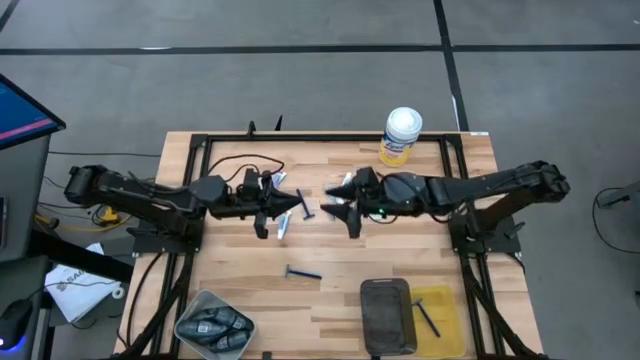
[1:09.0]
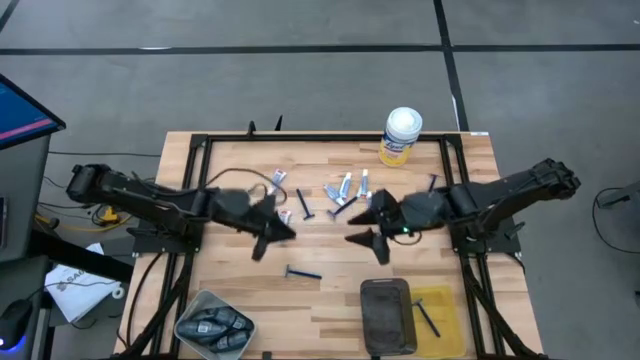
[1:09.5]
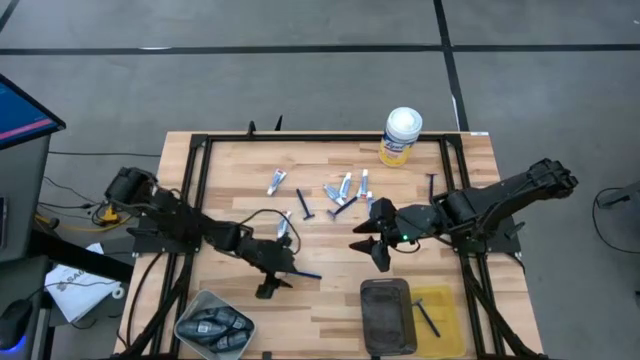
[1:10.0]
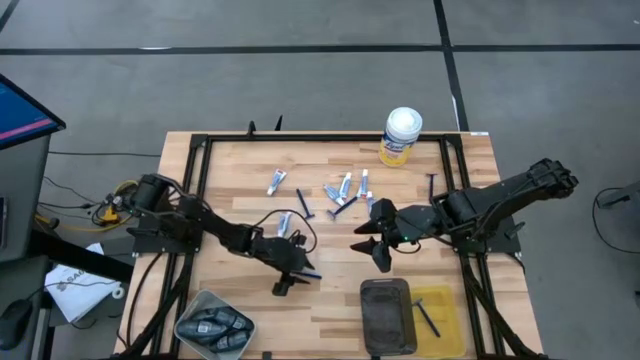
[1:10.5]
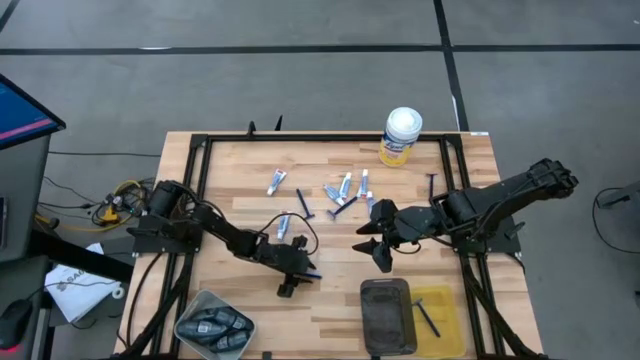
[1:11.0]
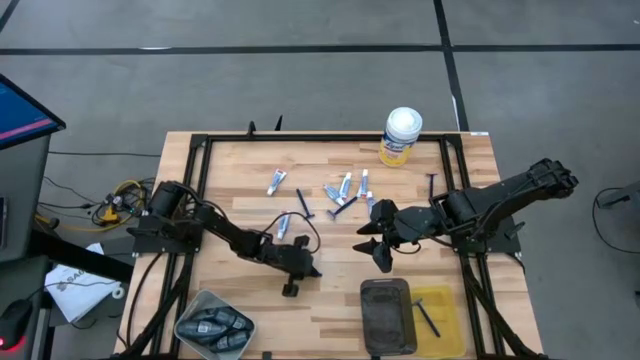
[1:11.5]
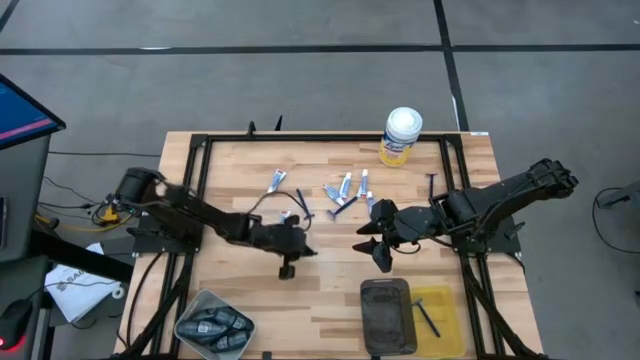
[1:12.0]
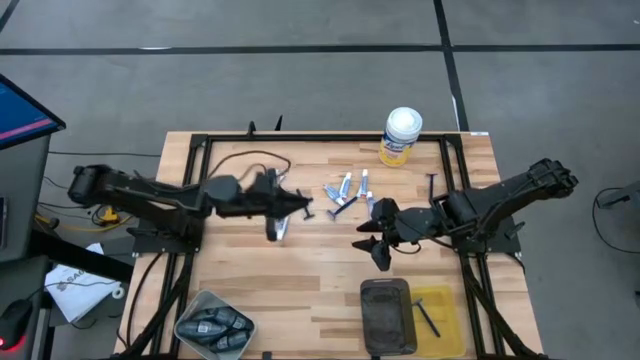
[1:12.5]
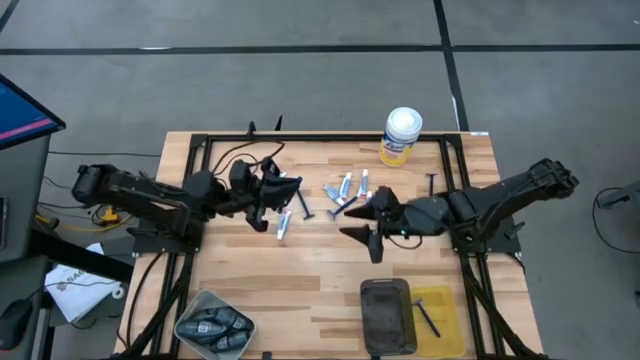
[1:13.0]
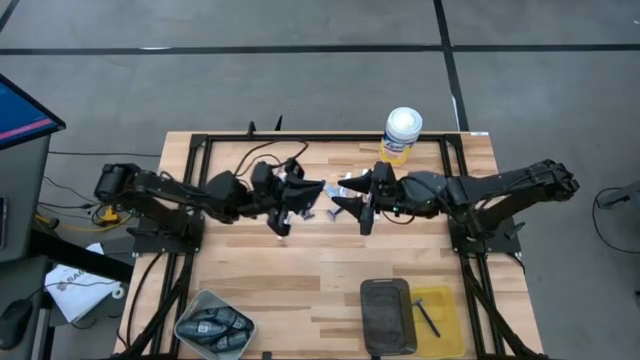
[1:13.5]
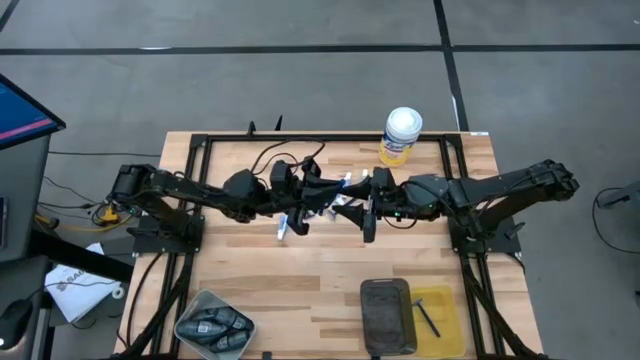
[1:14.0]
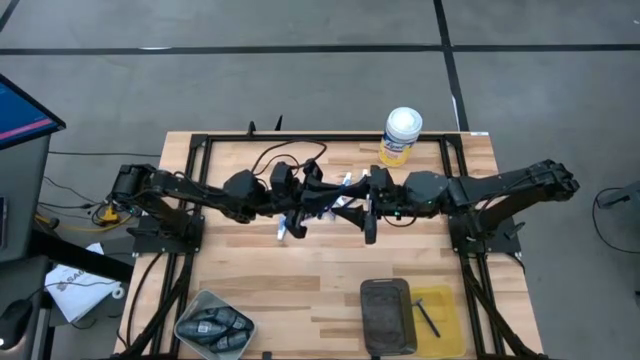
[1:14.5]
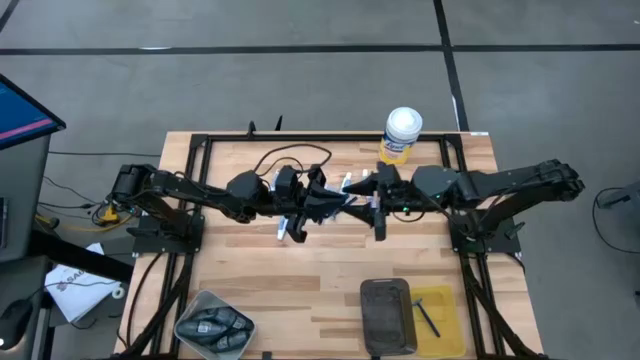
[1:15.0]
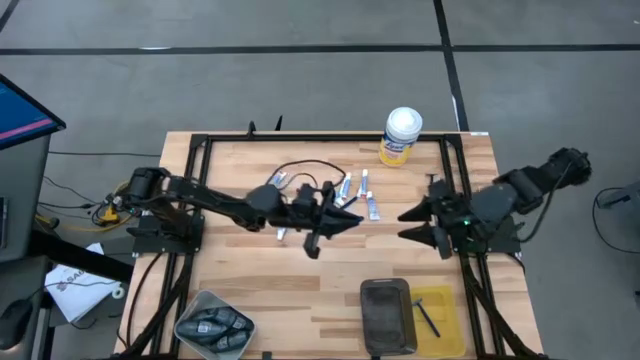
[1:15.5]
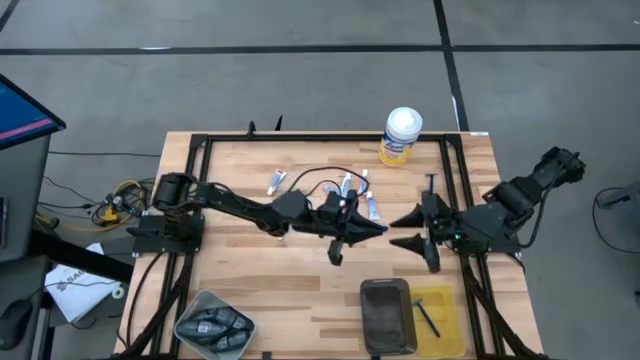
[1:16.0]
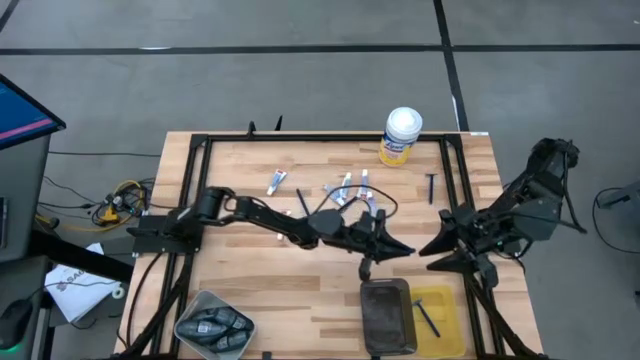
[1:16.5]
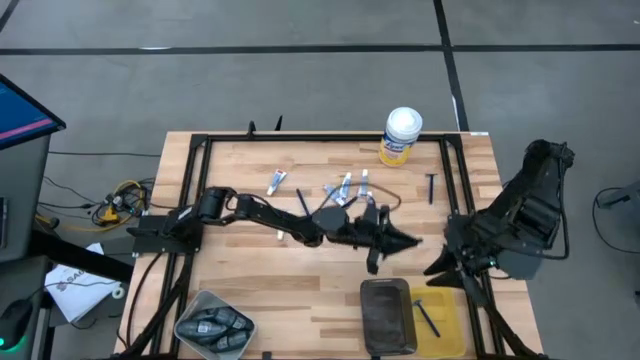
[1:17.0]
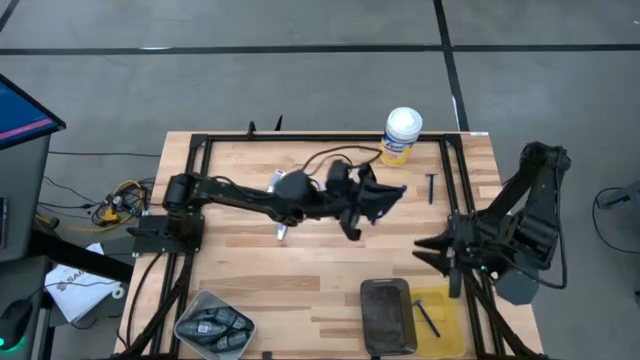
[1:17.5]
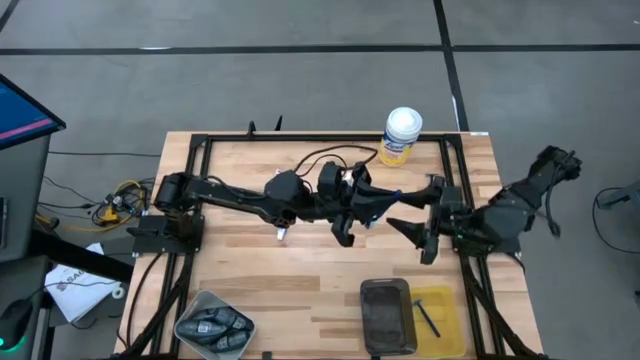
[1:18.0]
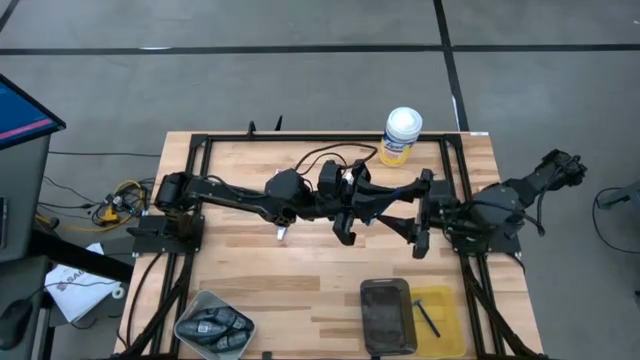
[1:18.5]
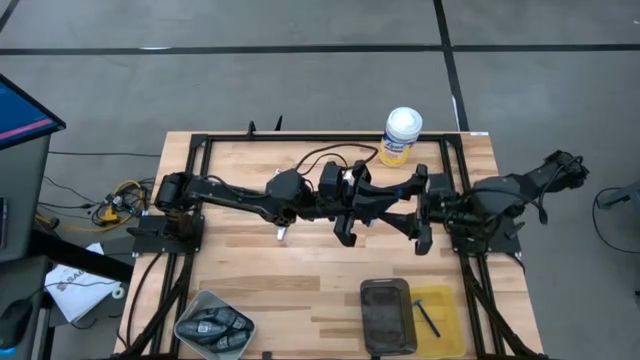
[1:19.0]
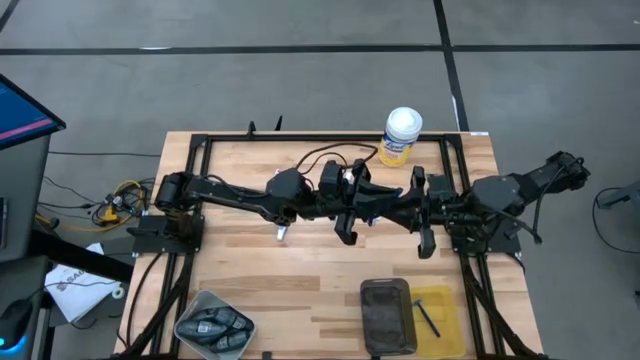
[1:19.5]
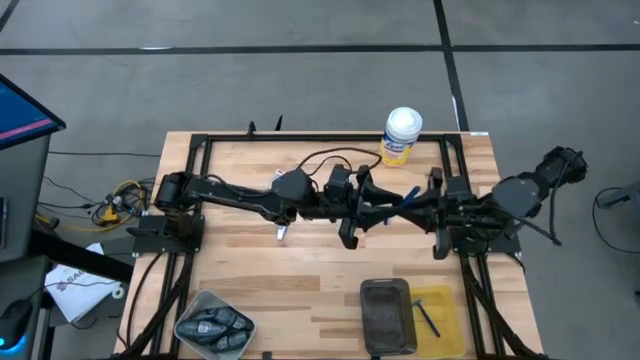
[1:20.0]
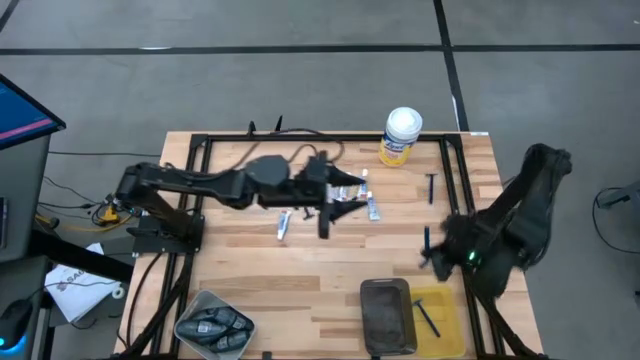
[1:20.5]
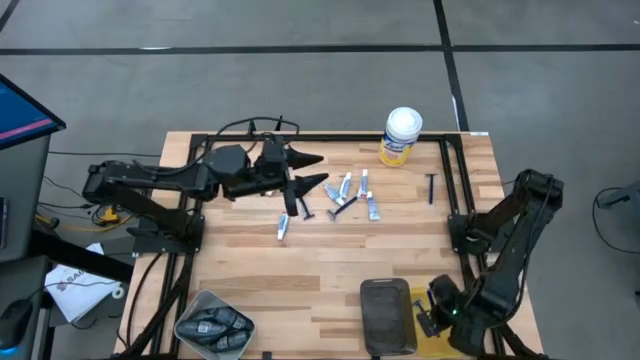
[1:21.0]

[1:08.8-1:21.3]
Task: Pick & Place Travel size toiletries
Put the razor into the yellow bin

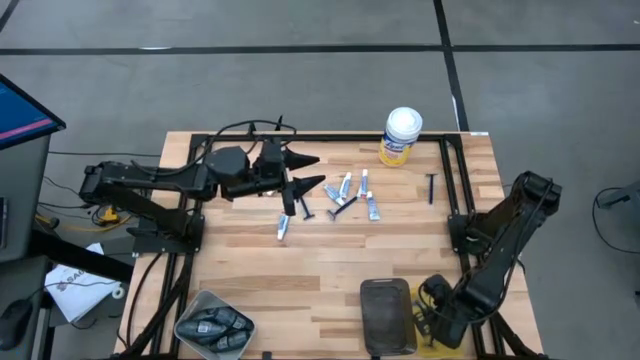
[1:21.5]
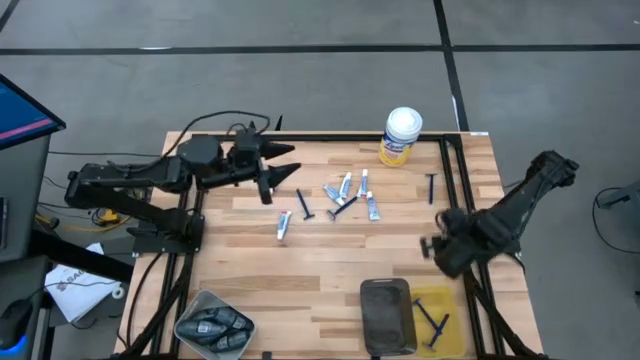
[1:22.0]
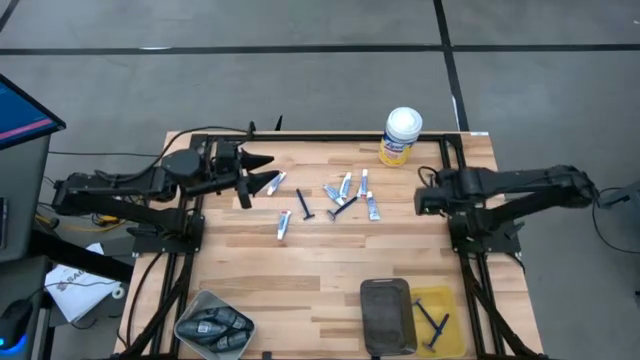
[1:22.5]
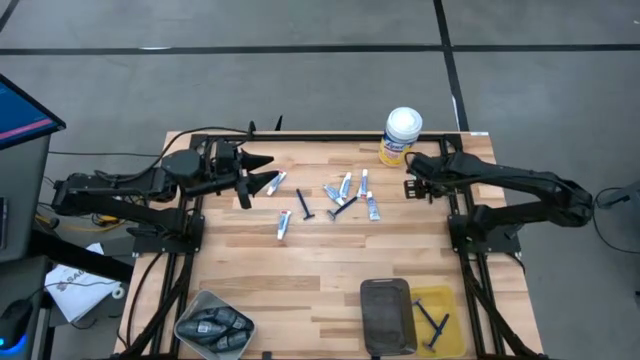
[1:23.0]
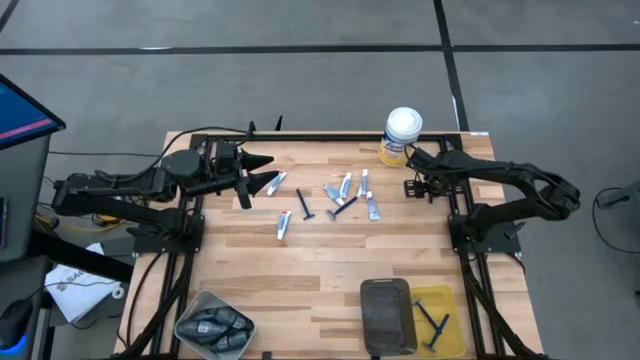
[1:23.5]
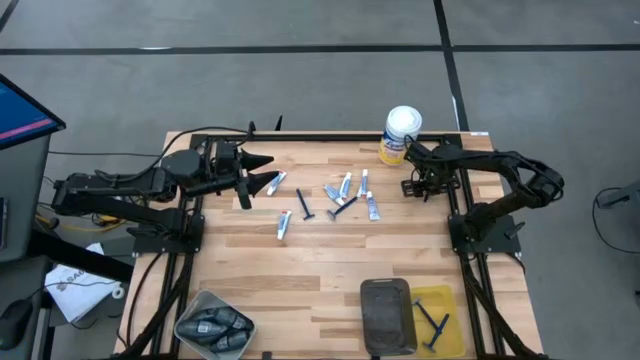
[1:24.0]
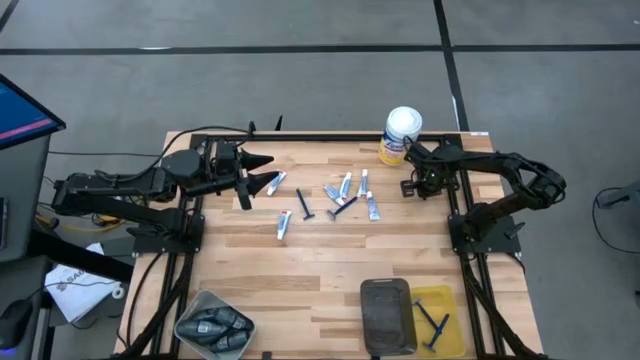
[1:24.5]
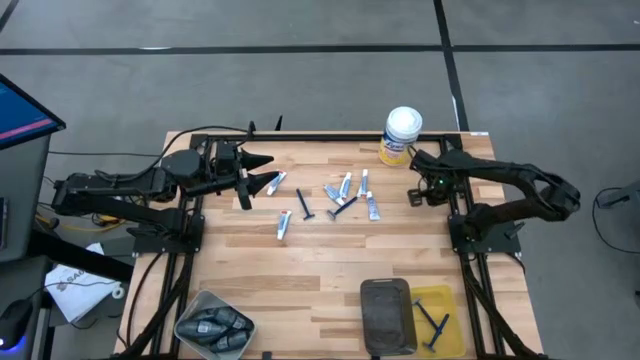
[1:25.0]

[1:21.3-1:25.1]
Put the razor into the yellow bin

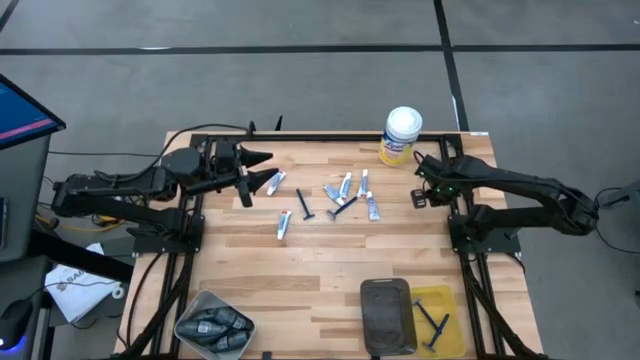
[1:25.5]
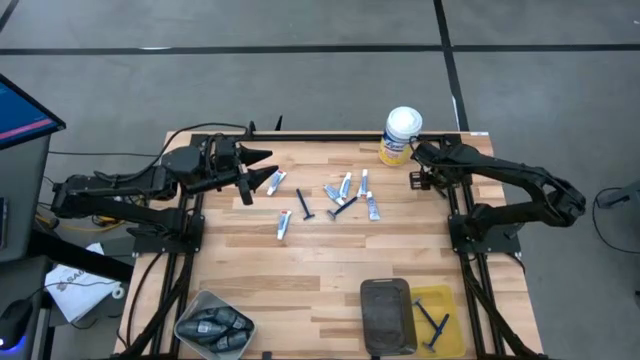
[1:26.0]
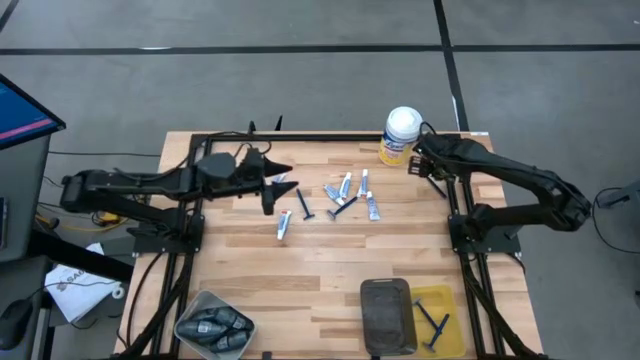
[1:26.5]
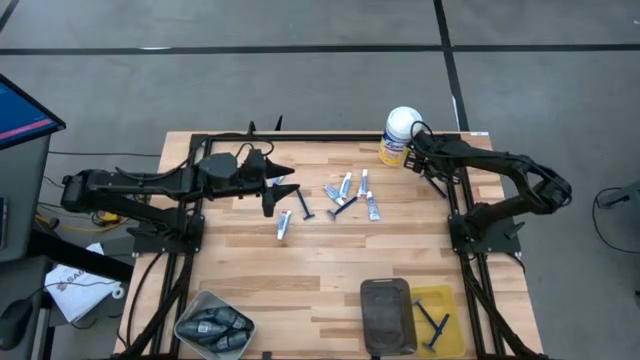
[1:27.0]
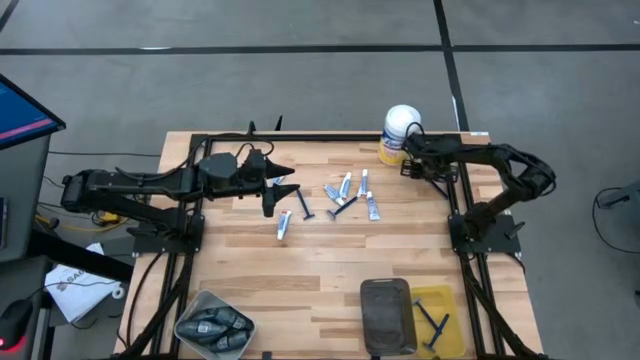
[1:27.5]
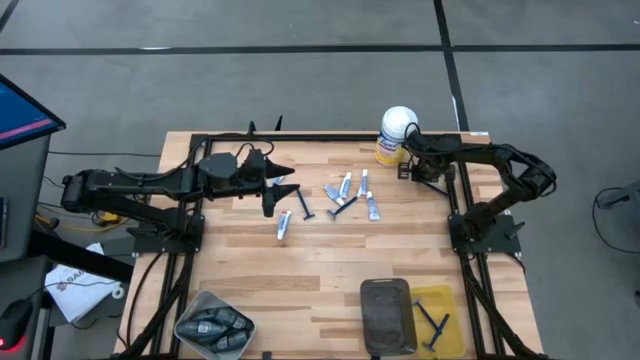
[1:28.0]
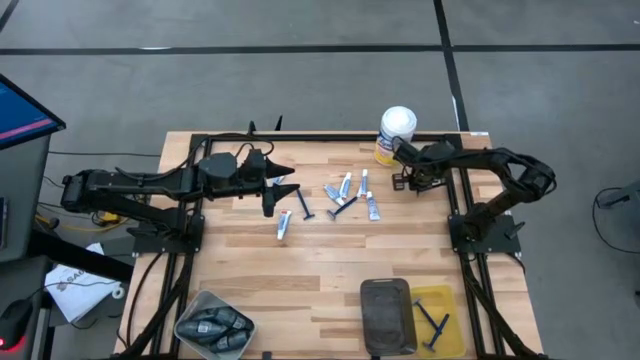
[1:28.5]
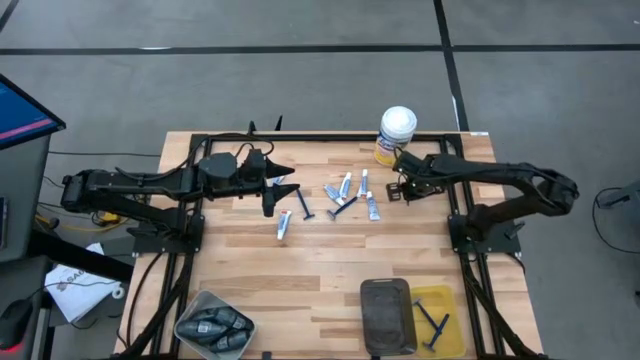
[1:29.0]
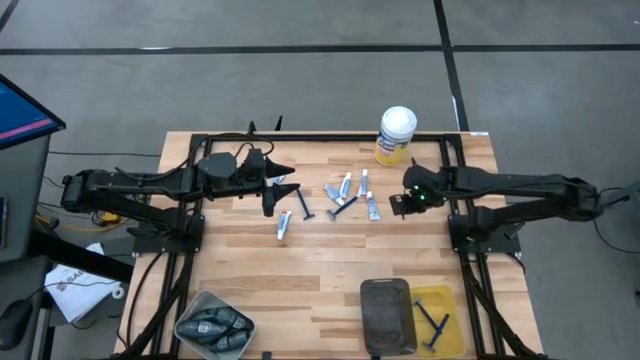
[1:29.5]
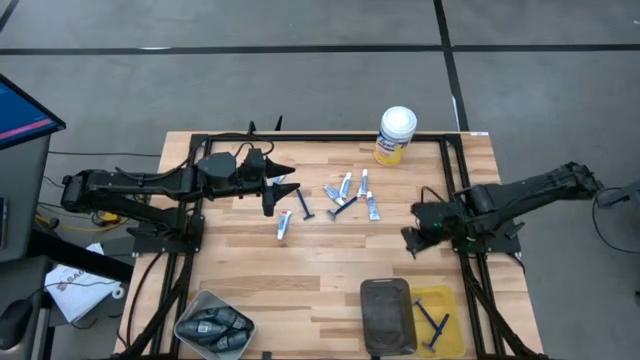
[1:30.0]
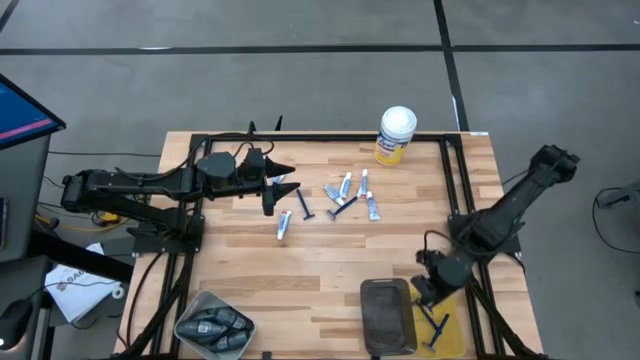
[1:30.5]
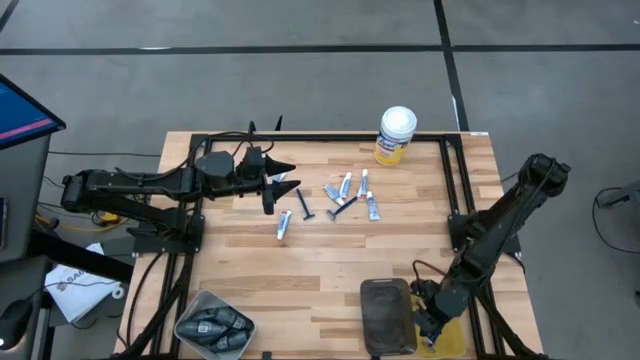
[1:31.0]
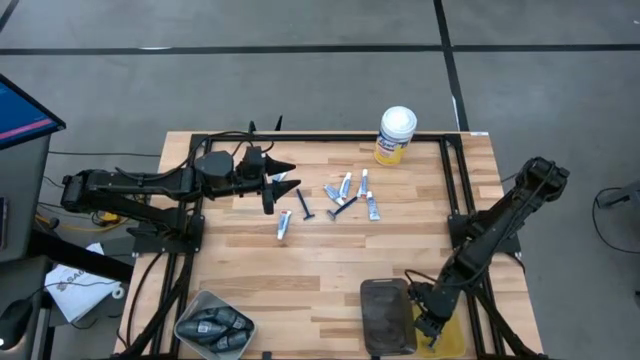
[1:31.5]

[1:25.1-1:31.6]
Put the razor into the yellow bin
